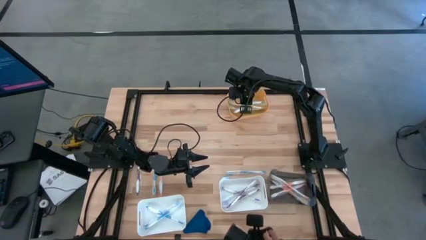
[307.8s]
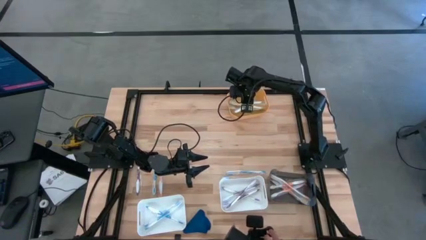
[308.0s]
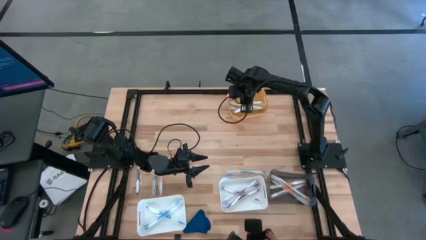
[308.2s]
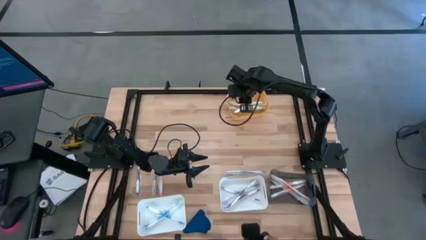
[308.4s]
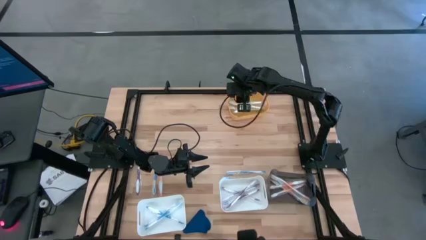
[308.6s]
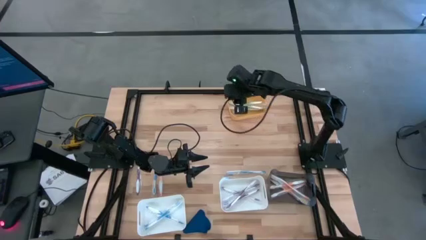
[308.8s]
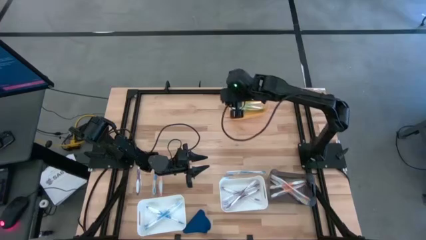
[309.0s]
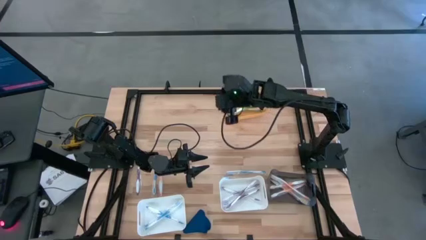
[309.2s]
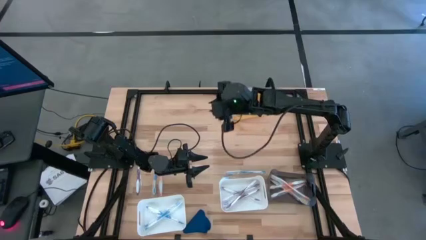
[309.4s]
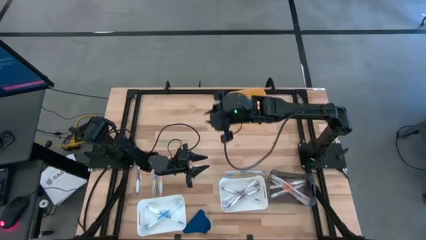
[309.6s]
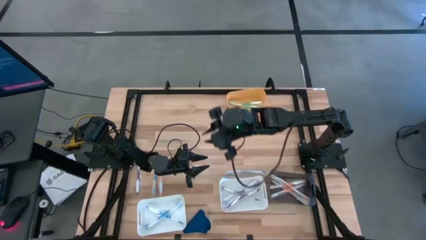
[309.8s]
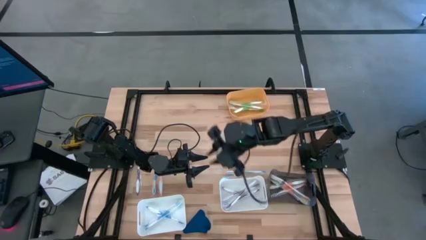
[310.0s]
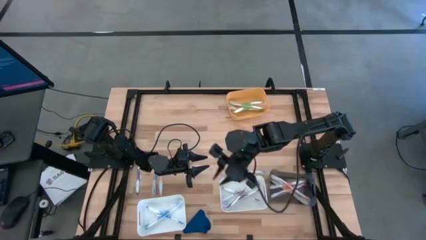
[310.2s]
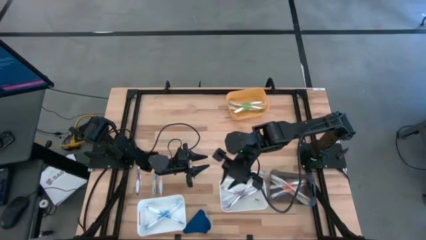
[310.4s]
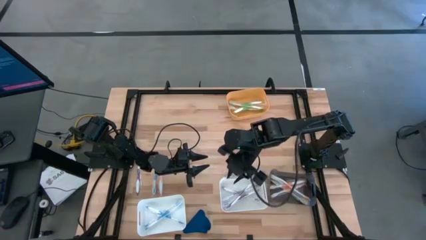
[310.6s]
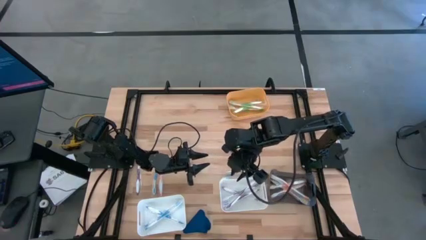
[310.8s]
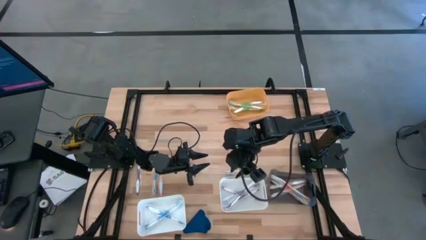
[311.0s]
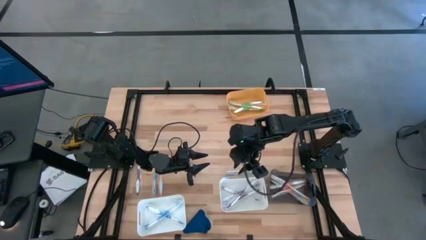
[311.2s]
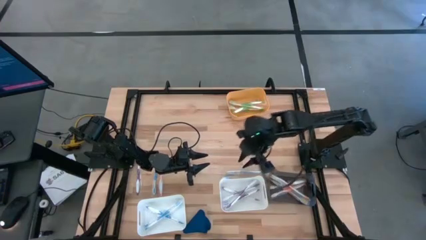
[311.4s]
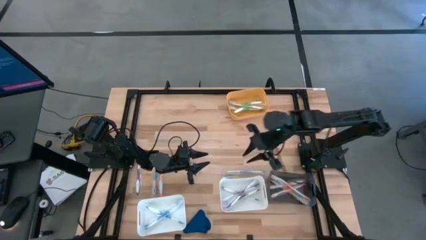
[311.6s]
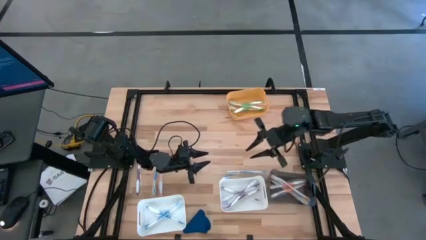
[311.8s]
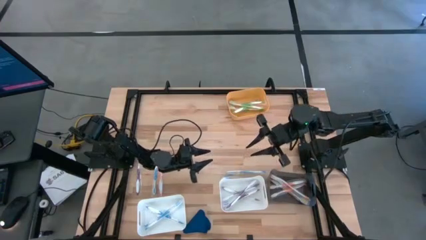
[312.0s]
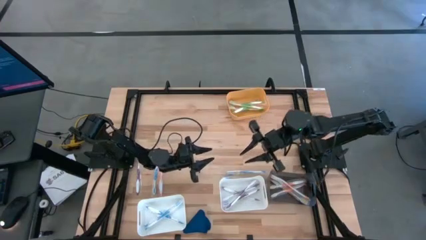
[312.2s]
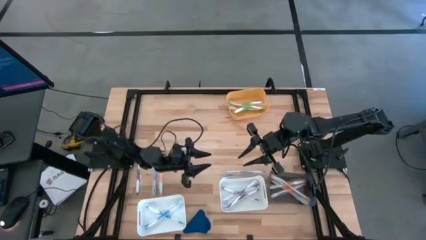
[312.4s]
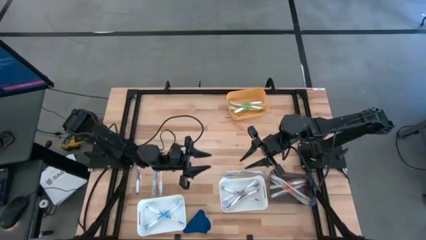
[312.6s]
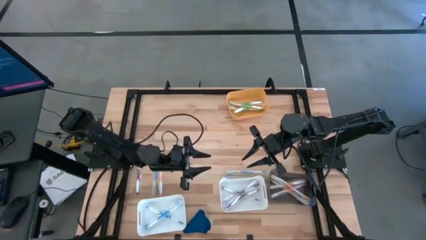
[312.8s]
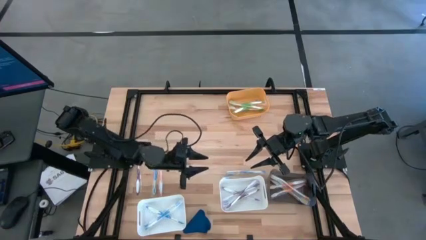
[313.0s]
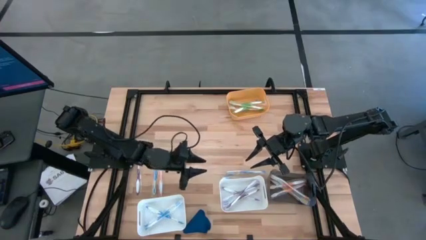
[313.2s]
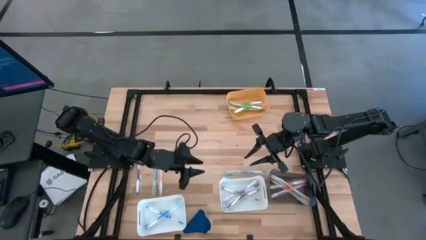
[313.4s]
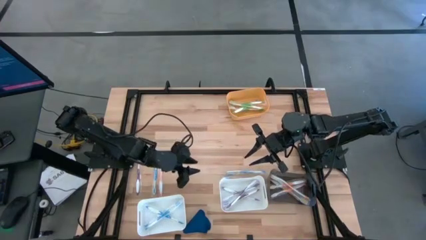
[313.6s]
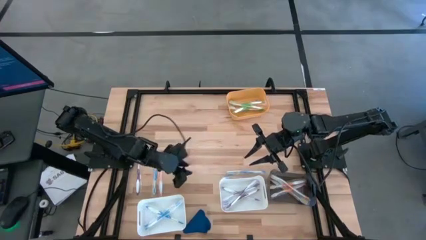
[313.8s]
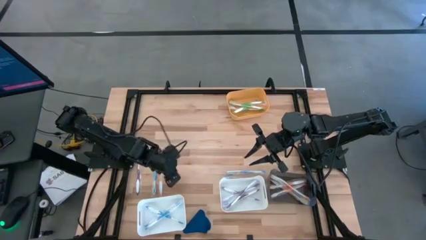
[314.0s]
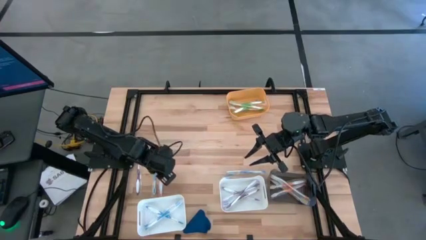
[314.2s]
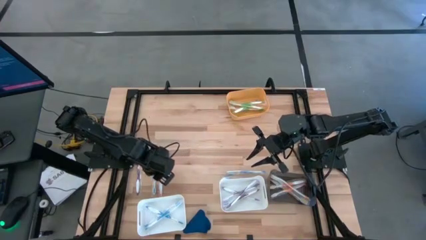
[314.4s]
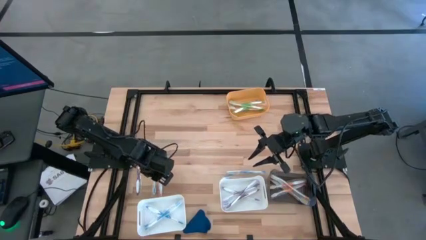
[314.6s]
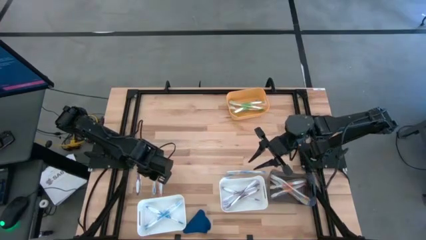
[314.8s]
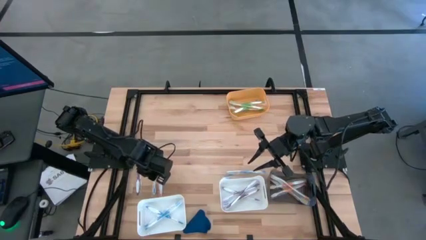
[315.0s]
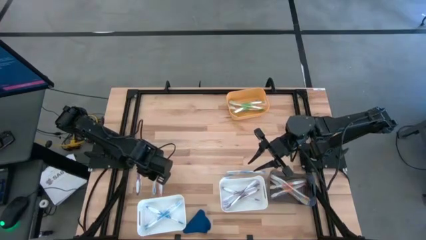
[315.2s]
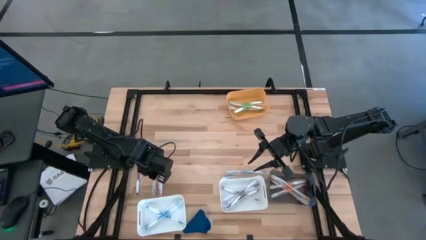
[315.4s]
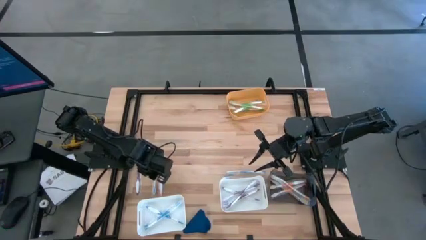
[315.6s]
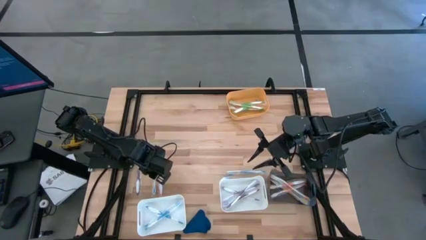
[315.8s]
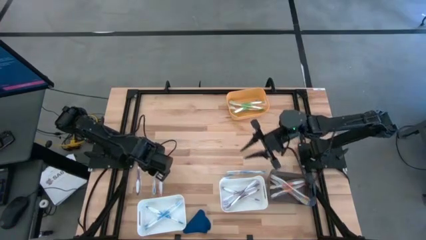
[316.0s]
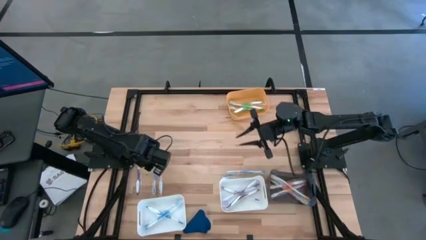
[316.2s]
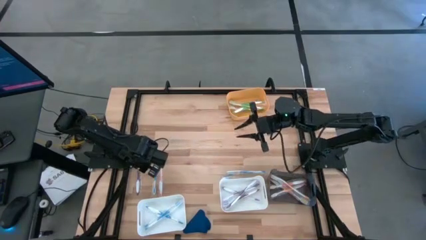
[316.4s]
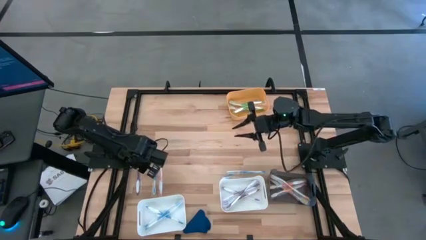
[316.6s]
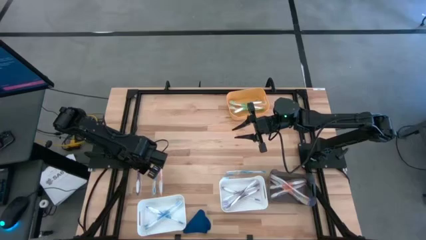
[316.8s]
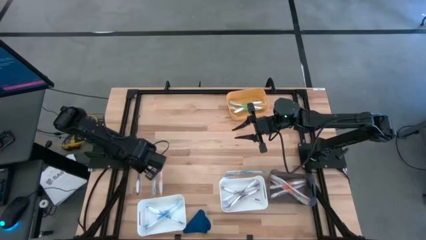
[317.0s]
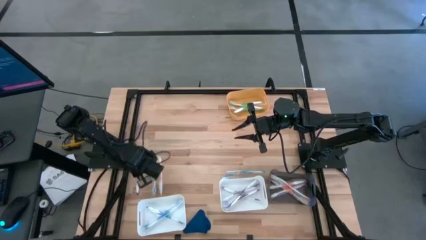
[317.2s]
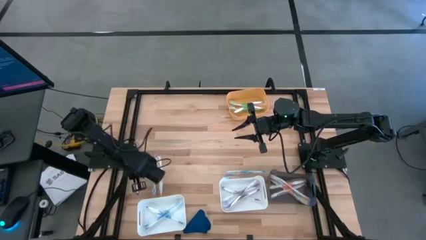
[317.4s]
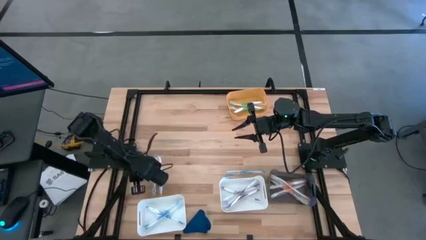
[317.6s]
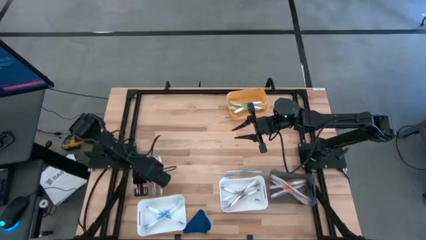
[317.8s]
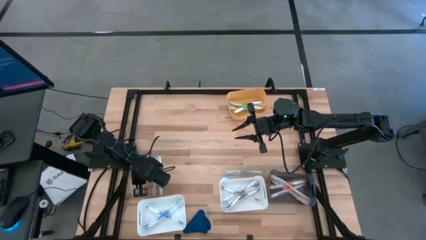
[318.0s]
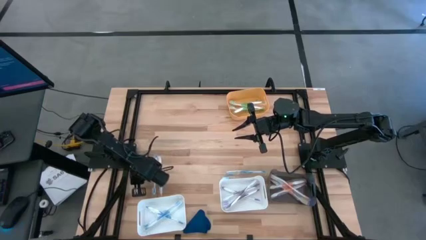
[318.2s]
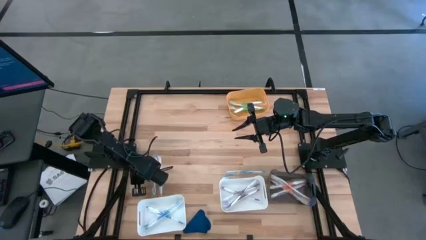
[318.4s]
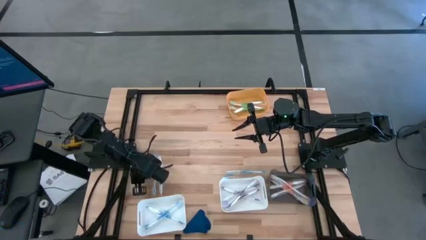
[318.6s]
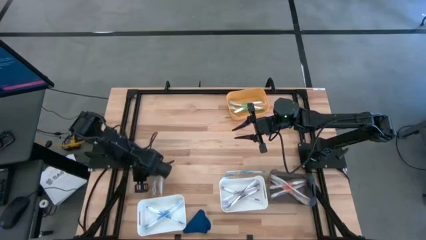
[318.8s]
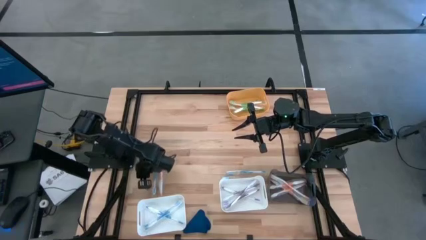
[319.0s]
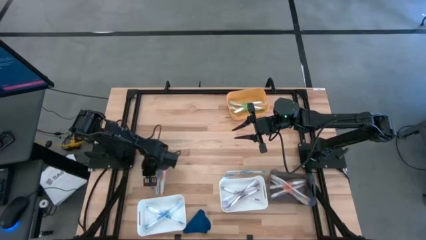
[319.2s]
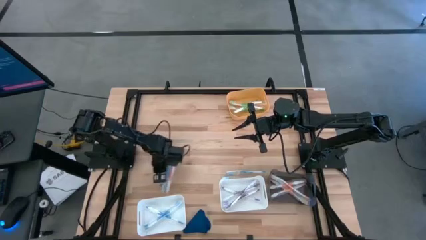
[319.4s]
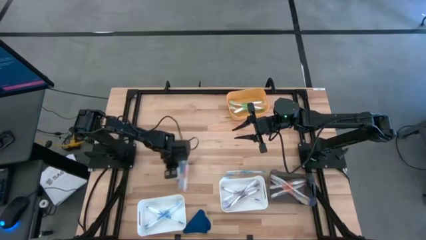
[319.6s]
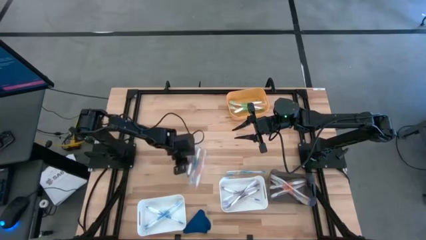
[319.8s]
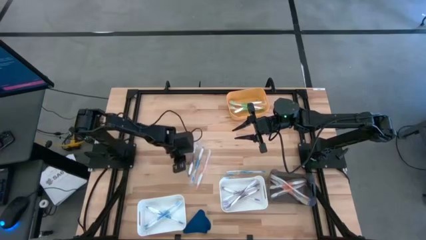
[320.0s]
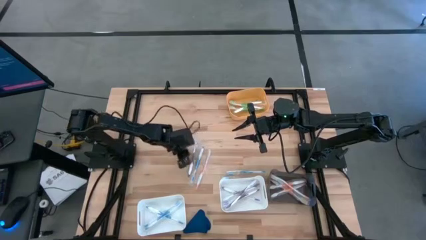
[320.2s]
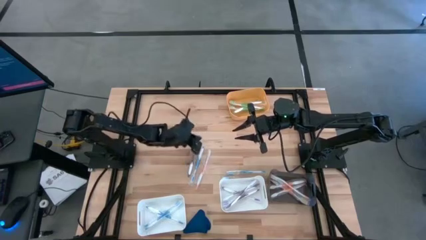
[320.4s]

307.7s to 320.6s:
Task: Pick & Place Toothbrushes
Put the violet toothbrush into the right white bin

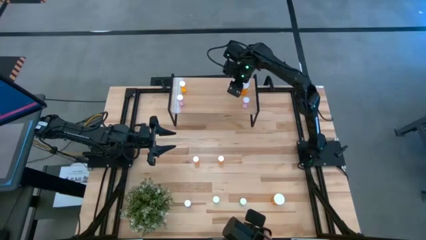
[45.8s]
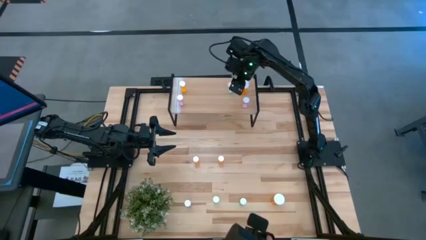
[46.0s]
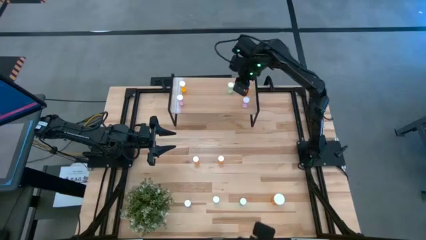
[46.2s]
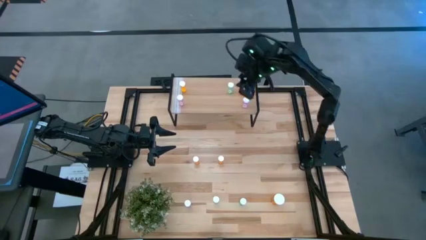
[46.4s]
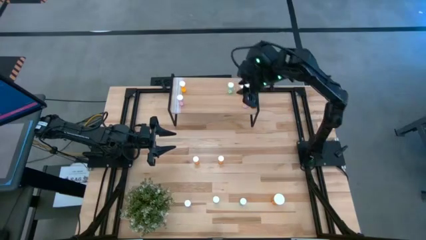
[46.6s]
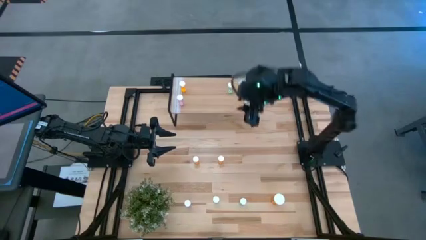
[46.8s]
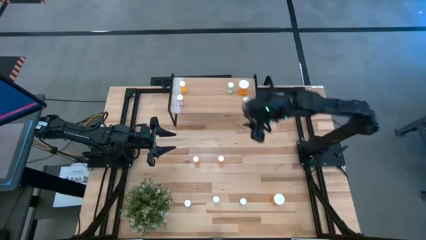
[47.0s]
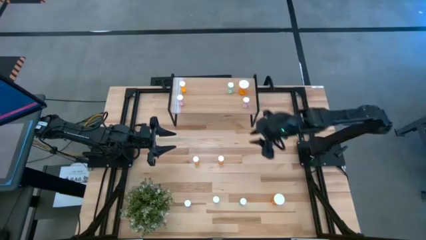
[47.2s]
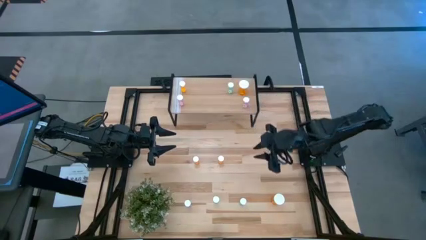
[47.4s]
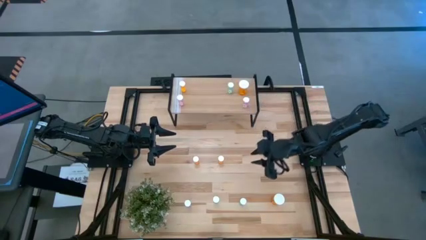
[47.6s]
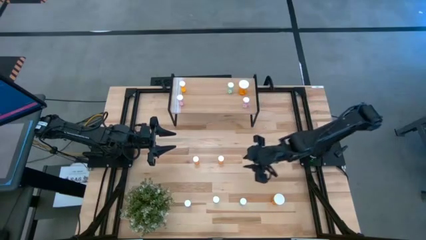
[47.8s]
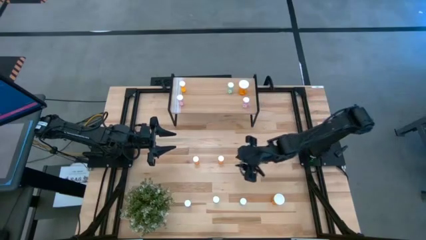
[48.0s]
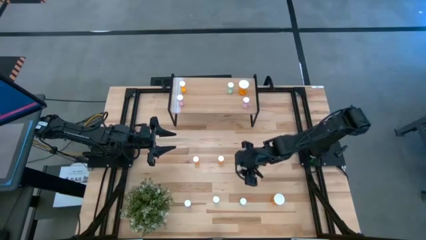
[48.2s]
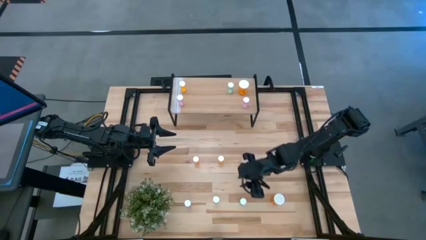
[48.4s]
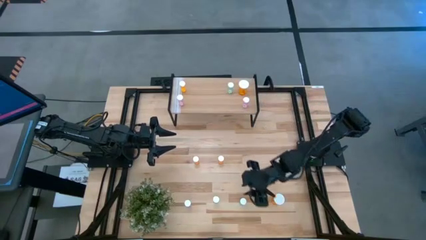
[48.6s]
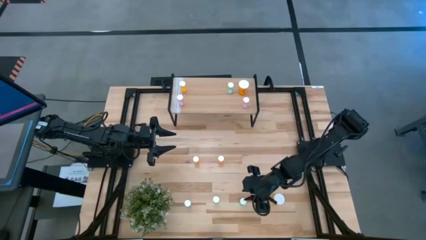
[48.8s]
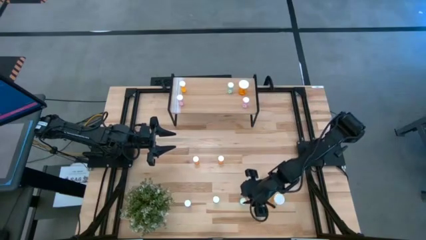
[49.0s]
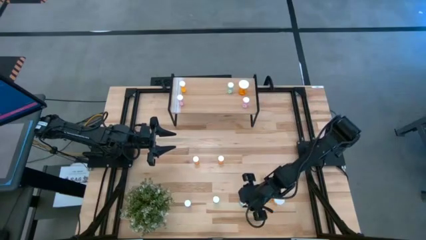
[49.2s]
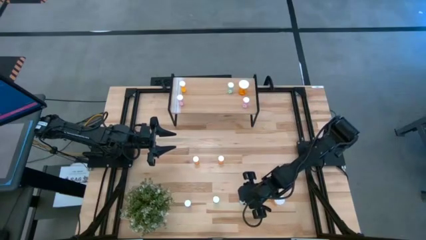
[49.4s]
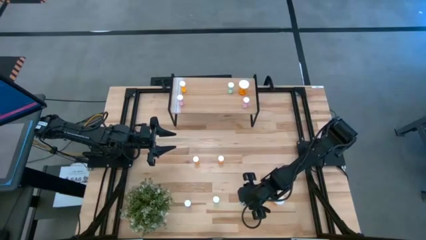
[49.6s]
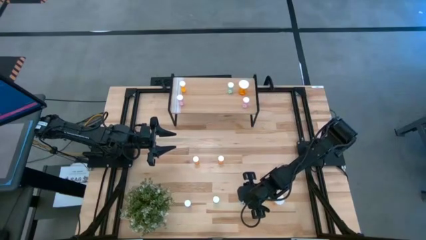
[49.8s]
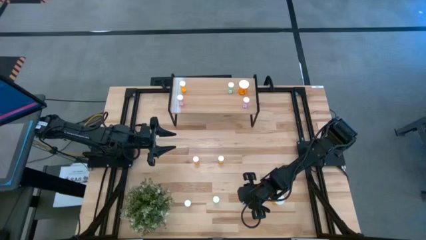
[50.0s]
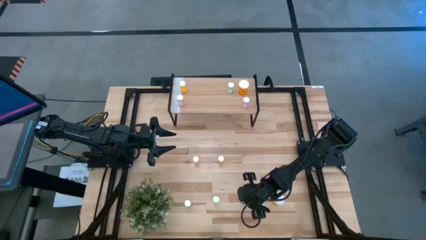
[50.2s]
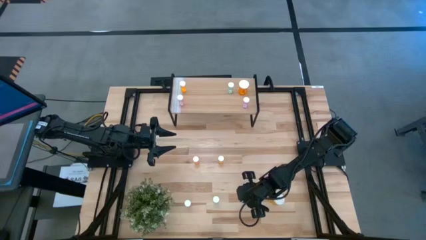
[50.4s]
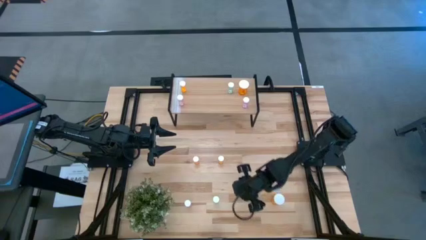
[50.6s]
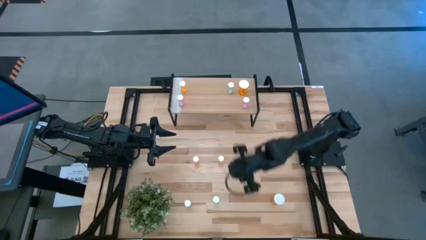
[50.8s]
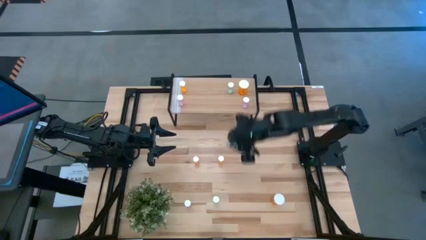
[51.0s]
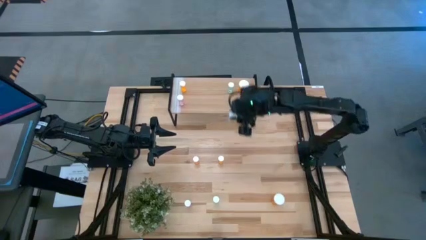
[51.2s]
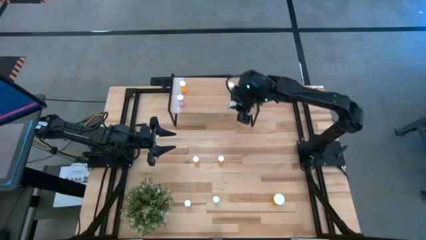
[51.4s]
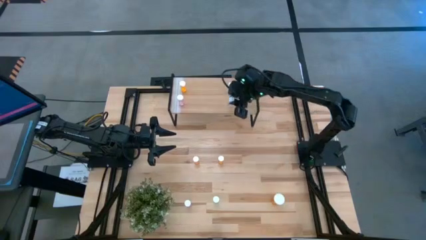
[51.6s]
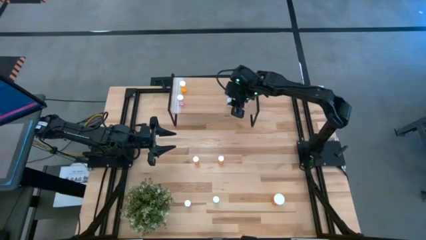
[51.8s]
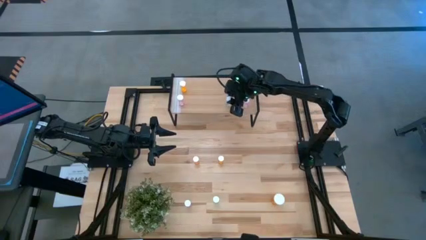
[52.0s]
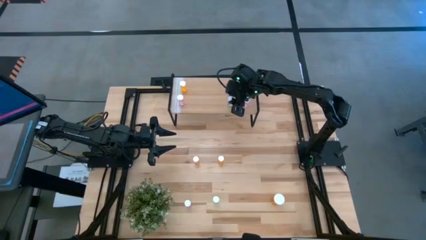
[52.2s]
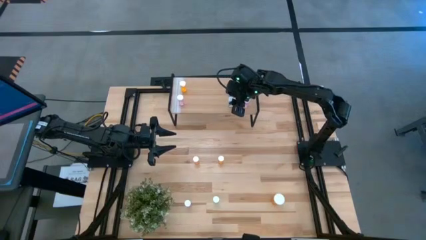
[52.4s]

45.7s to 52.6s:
Task: Pick and place medicine bottles onto shelf by color
Put the right small green pill bottle on the shelf
